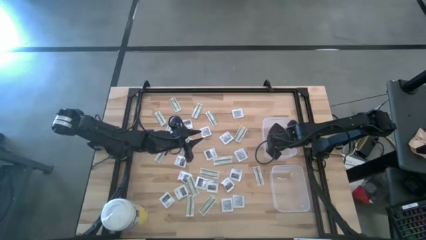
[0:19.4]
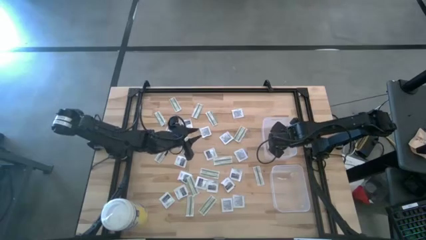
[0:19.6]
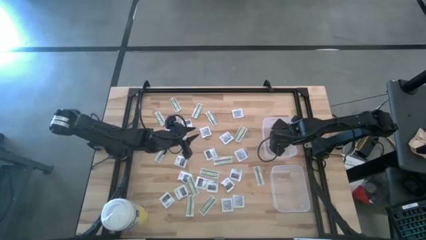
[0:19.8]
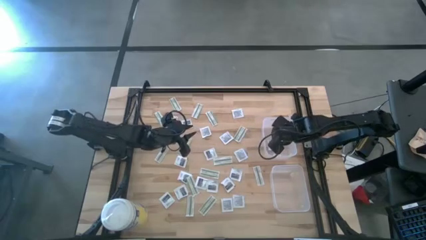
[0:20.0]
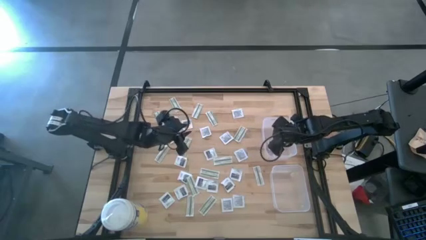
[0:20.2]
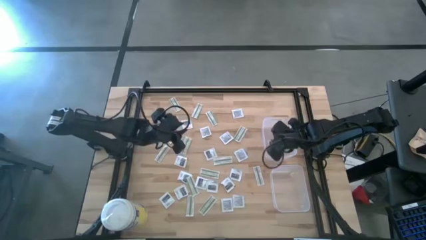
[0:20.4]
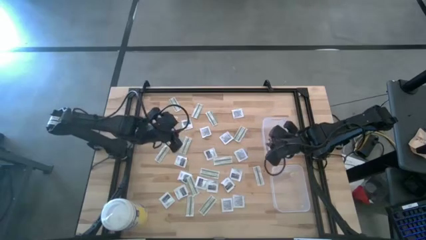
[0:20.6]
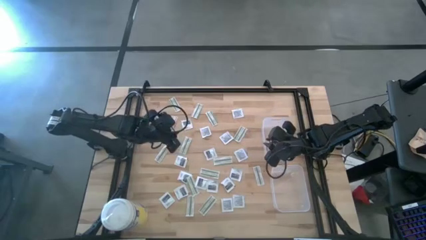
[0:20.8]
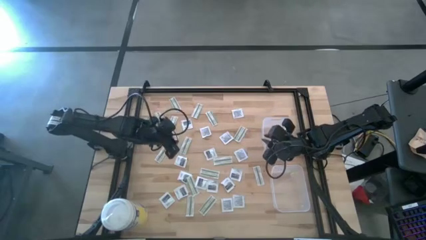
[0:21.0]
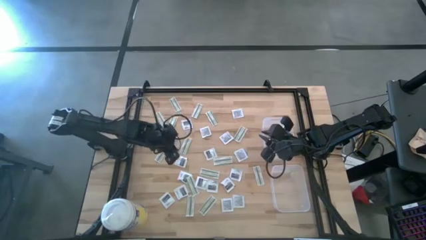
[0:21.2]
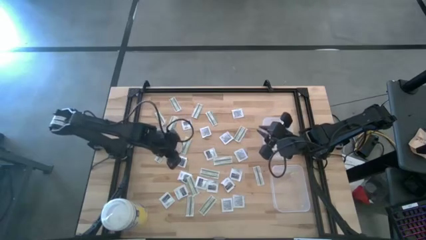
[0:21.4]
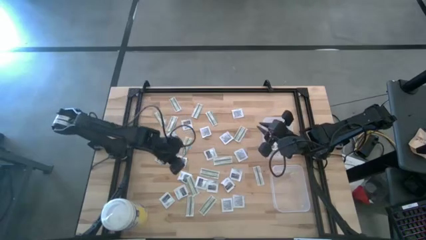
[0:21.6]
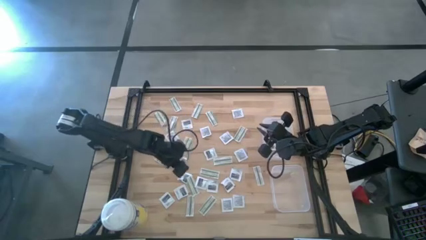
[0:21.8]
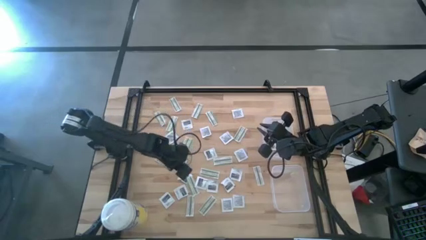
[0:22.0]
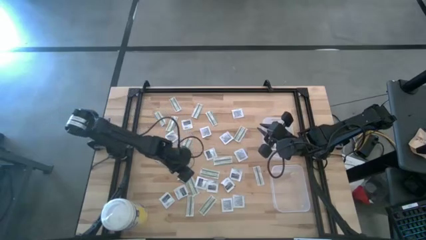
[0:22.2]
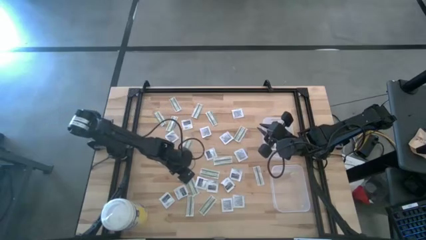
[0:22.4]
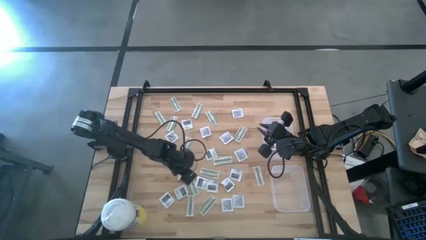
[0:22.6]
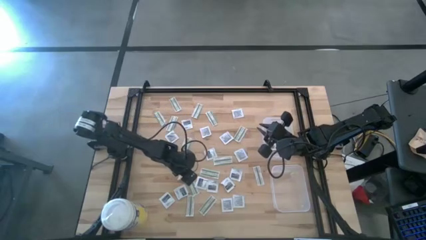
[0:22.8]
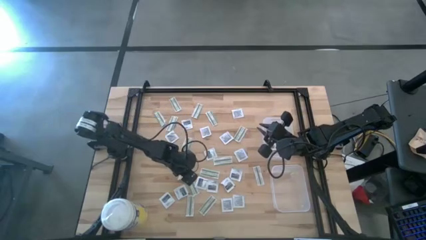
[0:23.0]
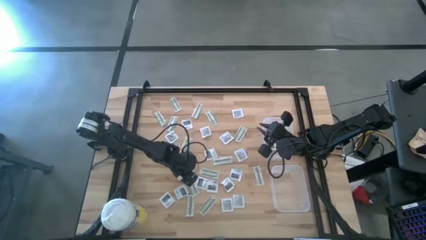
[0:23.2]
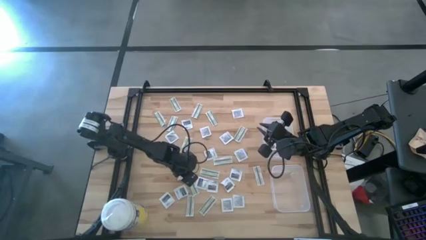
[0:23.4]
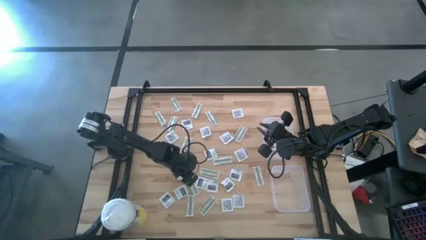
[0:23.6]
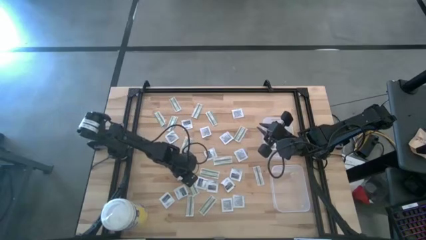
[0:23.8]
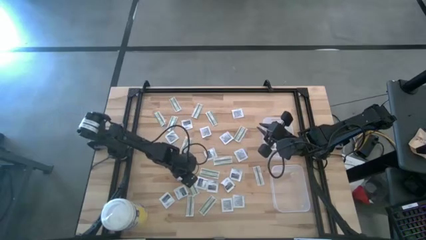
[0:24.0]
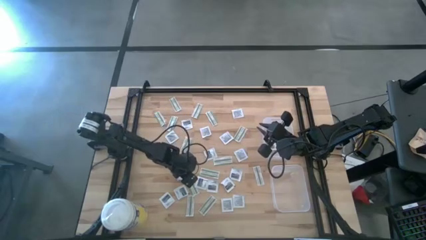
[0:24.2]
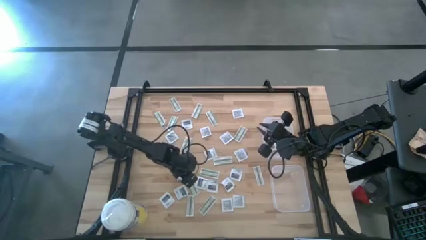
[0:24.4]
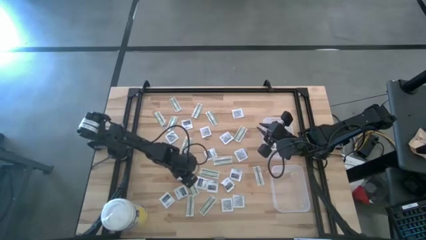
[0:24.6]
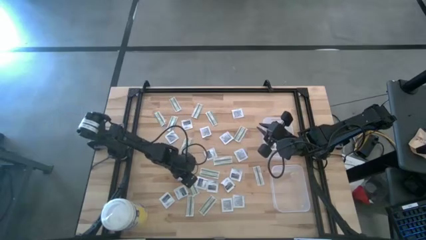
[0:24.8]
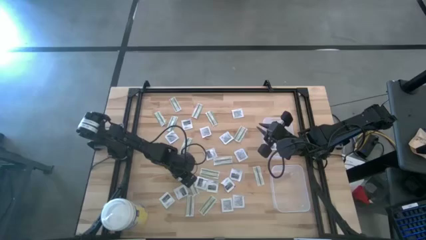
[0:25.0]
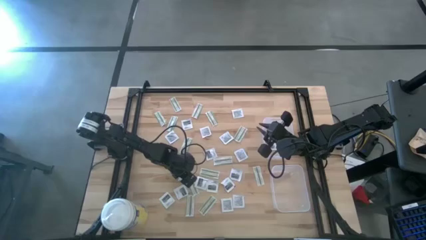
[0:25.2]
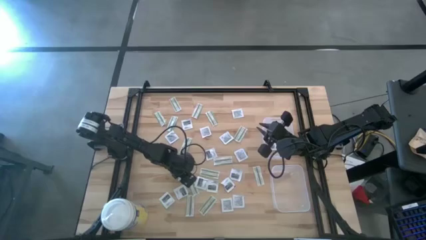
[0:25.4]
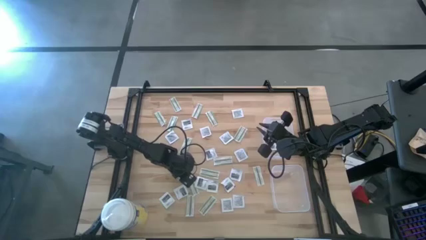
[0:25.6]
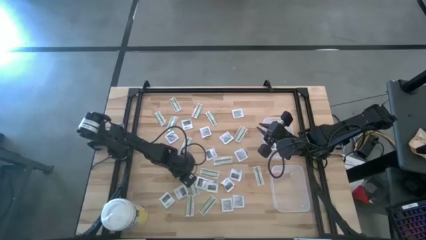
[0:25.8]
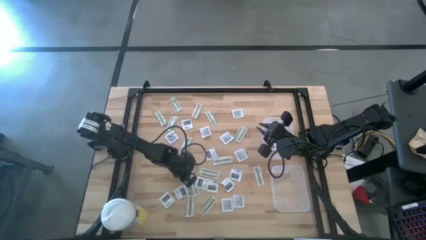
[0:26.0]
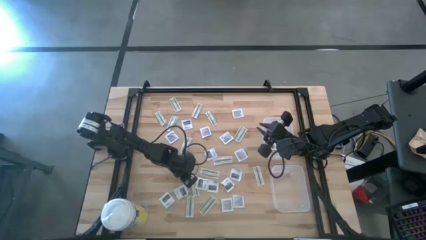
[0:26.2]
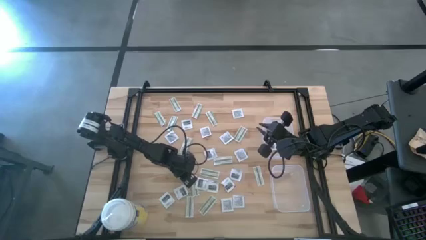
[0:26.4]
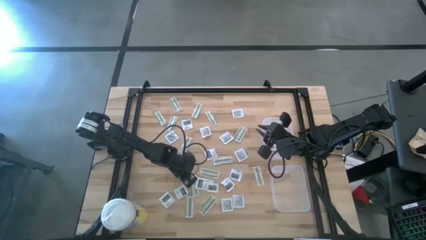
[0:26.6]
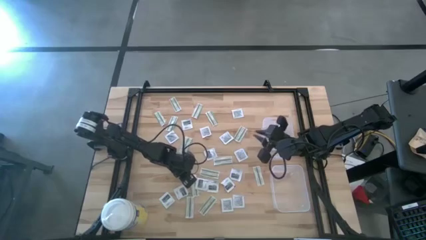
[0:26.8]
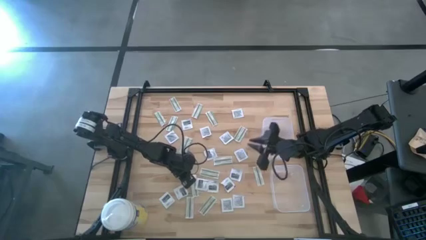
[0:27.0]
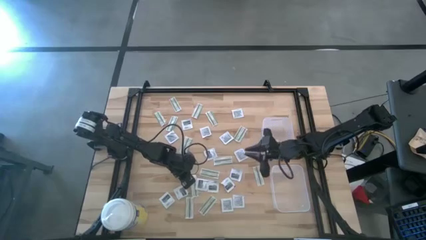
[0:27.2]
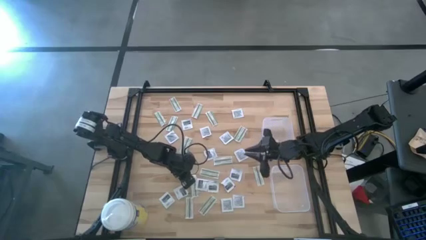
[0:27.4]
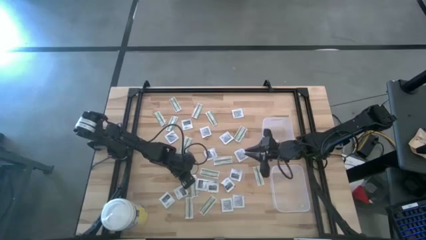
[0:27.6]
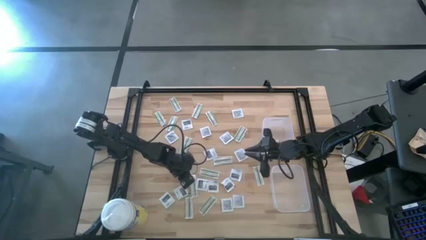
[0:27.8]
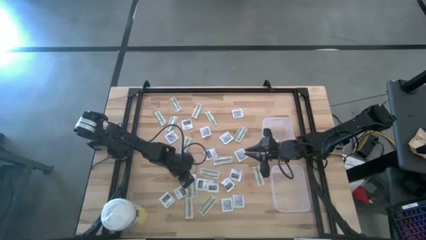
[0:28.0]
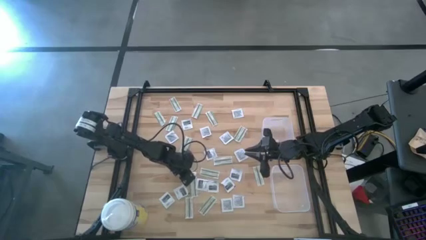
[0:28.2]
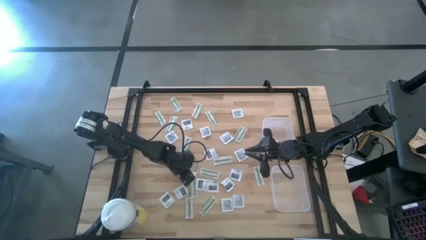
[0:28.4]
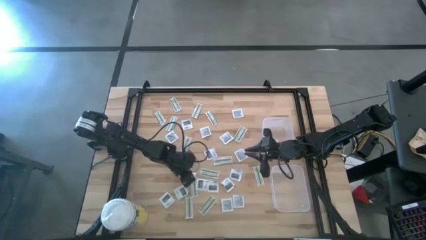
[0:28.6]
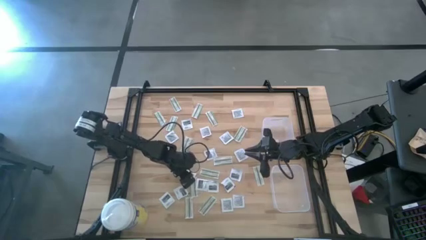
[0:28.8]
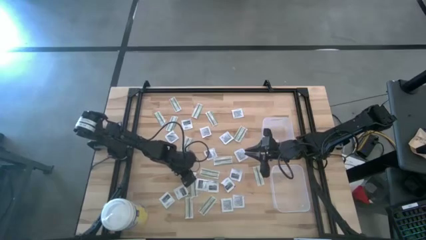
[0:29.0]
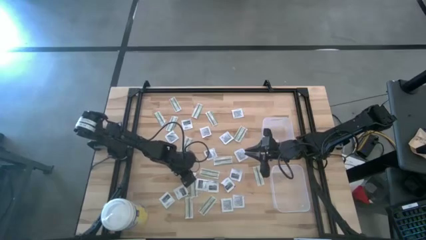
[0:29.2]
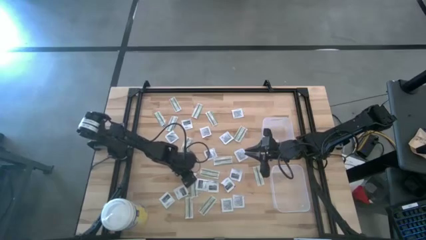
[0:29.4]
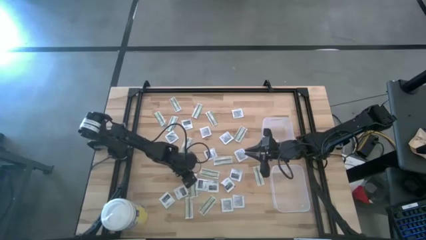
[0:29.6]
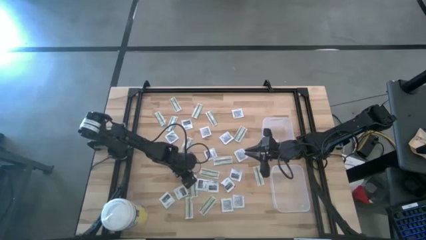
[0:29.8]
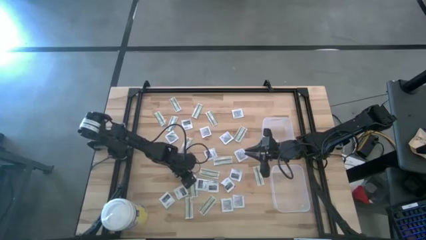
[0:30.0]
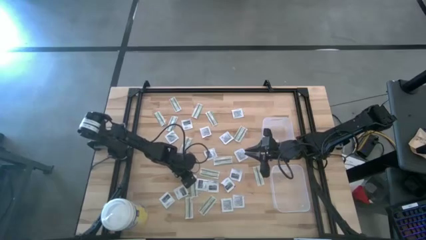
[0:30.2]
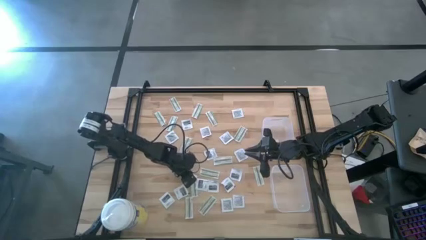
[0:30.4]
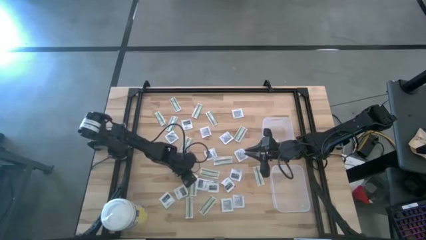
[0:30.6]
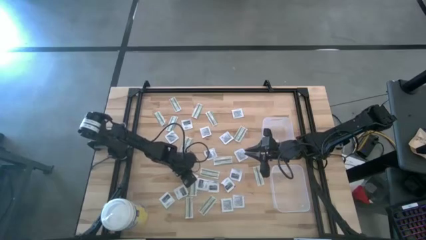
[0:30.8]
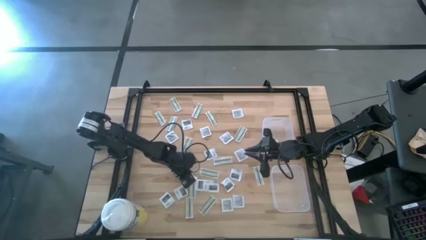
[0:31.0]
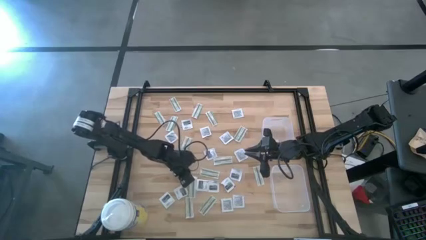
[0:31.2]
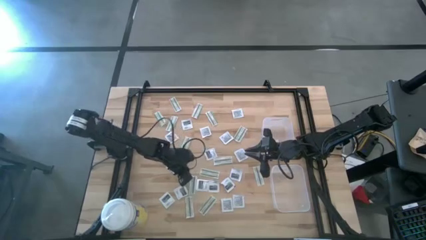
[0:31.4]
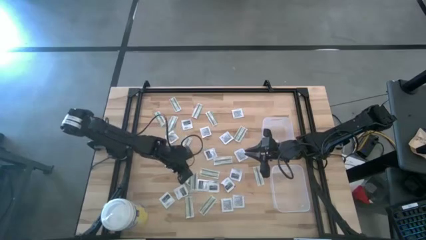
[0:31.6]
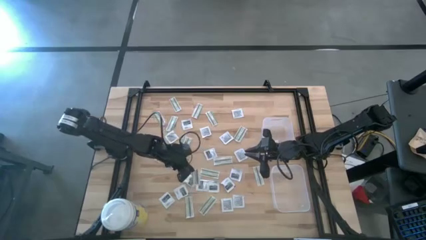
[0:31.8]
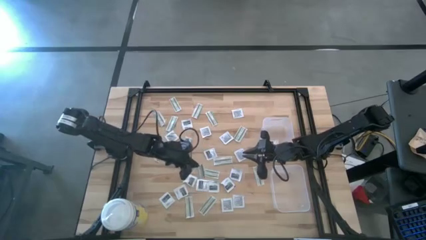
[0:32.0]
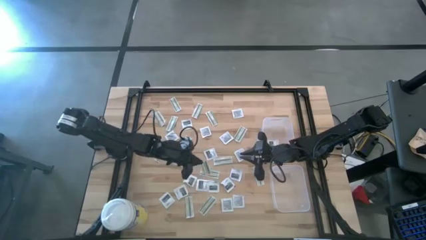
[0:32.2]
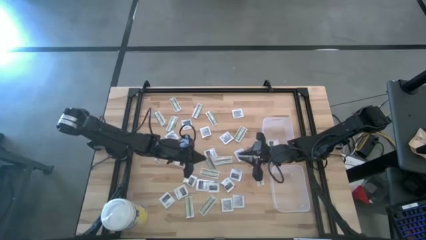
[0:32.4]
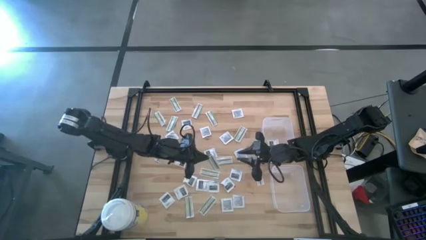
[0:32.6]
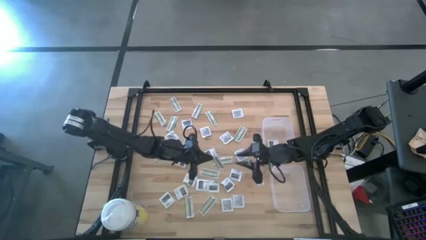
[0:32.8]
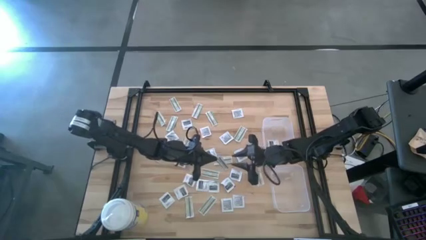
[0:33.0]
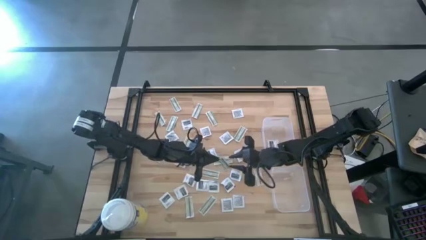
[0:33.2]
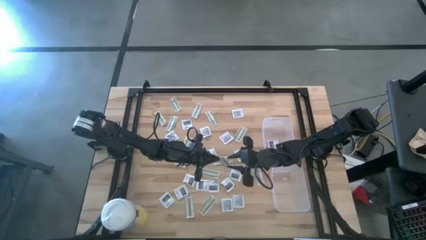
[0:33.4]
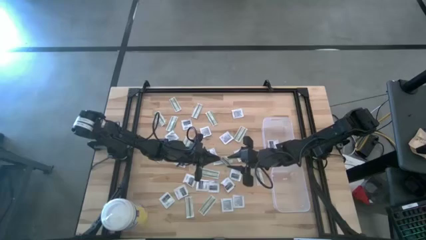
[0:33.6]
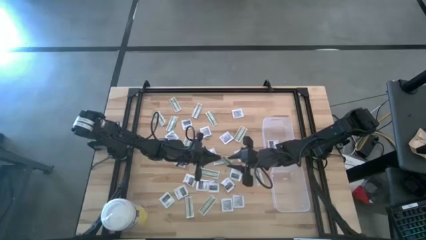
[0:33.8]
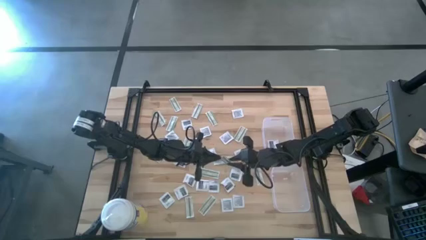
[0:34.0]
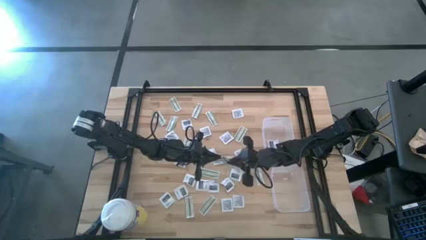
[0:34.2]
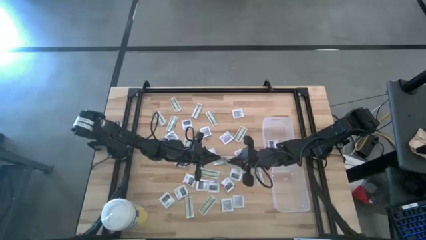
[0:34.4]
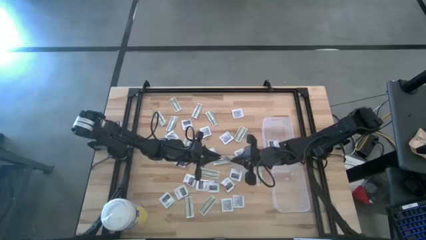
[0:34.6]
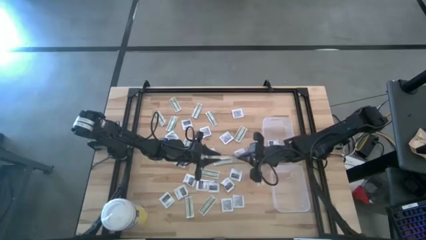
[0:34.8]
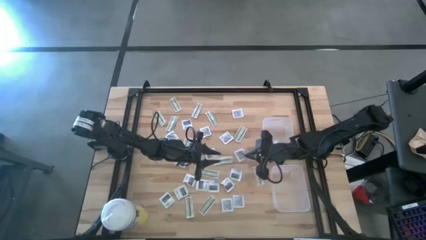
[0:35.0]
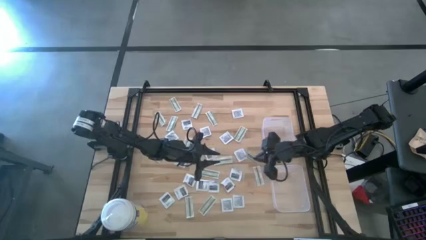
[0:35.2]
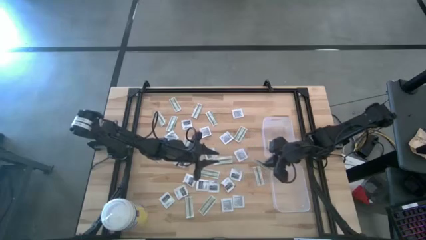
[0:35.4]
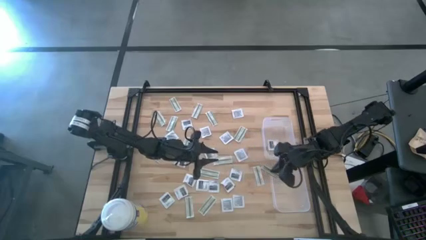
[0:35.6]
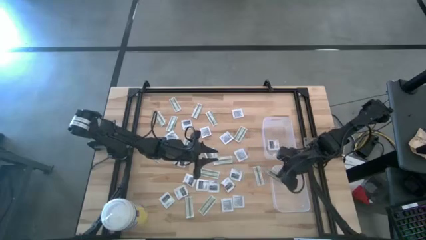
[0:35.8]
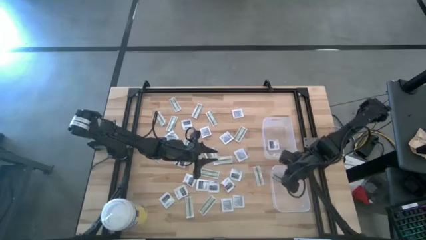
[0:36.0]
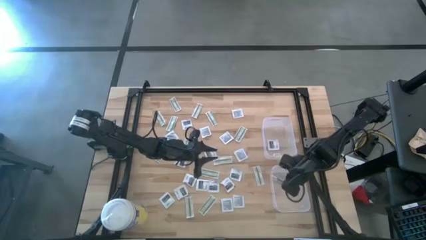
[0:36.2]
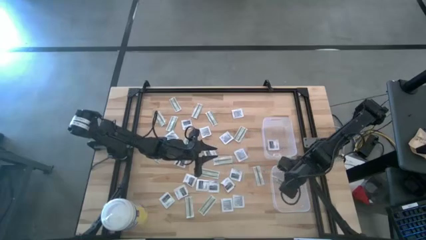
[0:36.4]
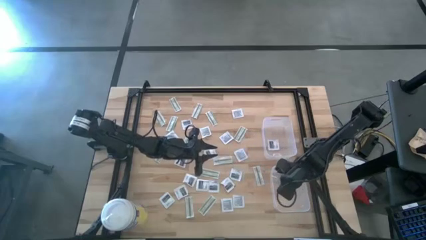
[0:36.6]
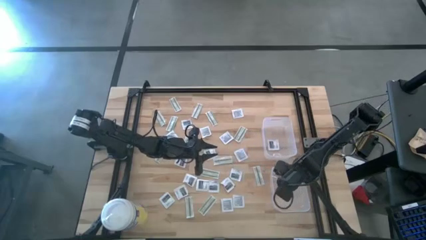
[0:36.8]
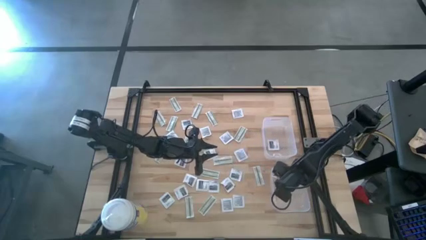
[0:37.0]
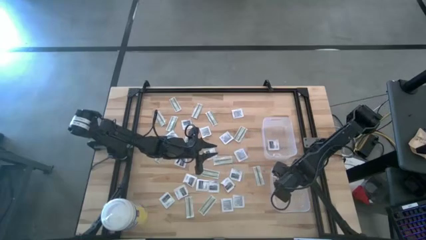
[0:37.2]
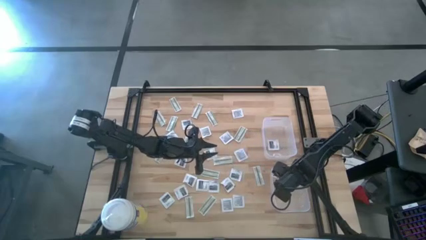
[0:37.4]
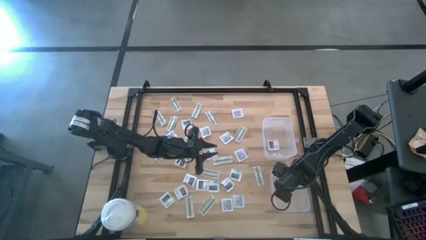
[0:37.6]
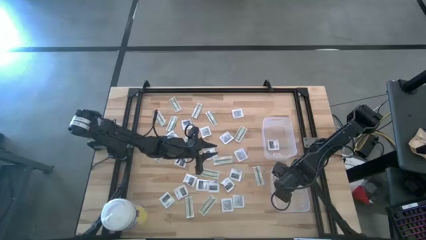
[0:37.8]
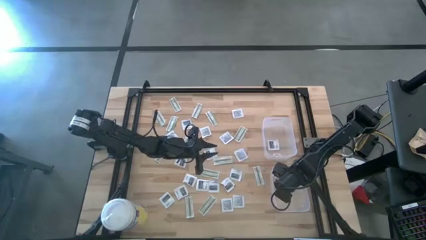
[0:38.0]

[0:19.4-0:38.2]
Task: Pick & Place First Aid Supplies
Put the bandage pack into the bottom bin
